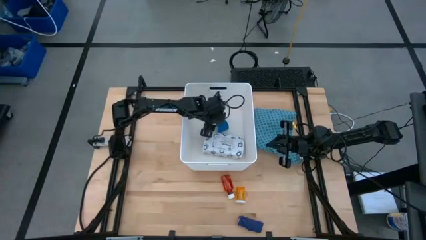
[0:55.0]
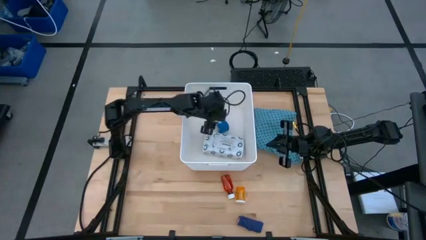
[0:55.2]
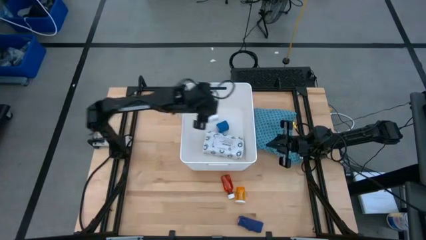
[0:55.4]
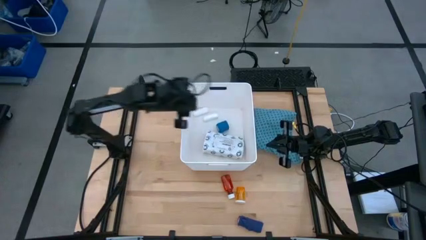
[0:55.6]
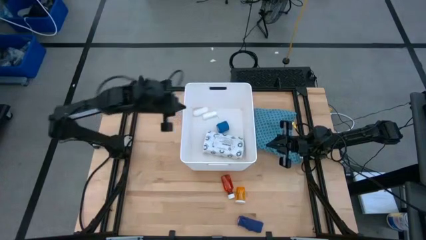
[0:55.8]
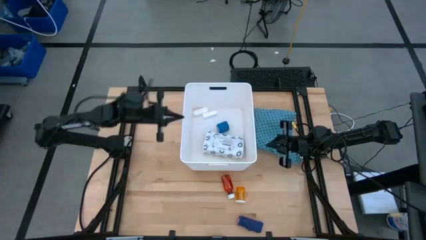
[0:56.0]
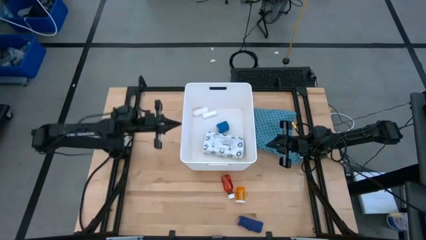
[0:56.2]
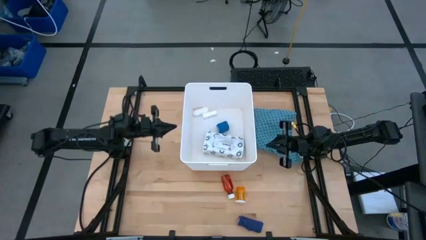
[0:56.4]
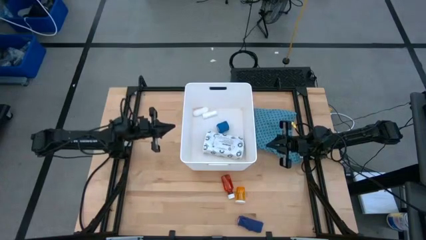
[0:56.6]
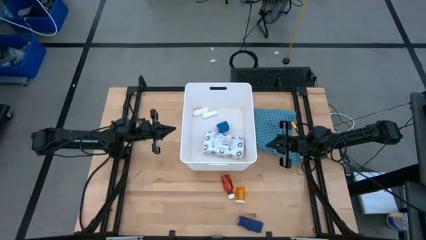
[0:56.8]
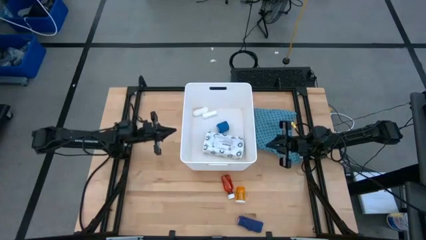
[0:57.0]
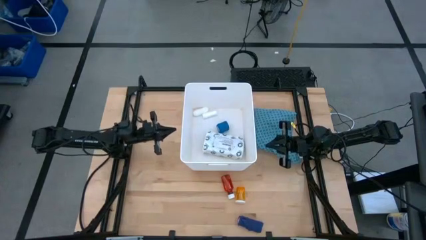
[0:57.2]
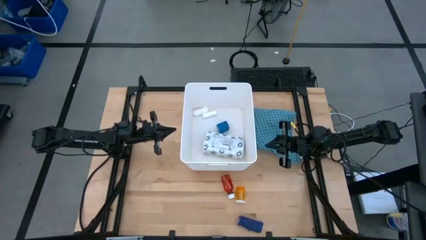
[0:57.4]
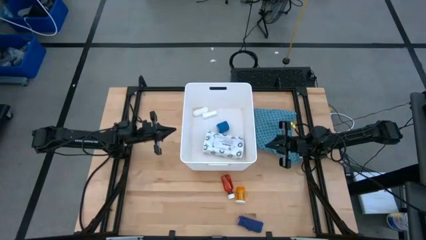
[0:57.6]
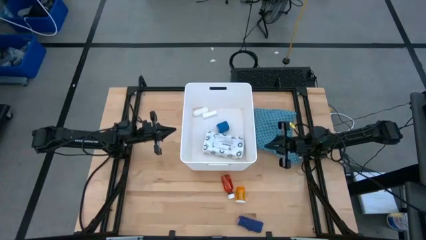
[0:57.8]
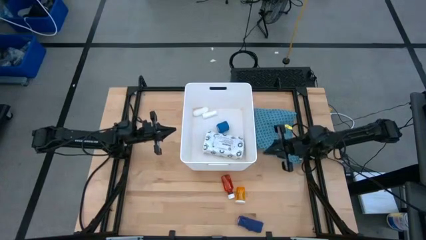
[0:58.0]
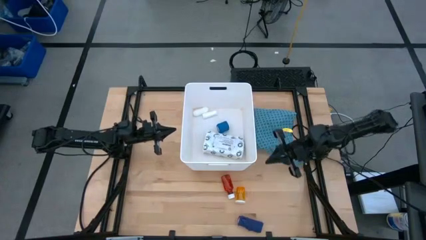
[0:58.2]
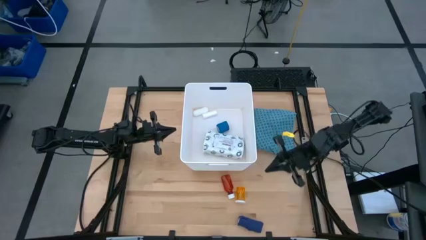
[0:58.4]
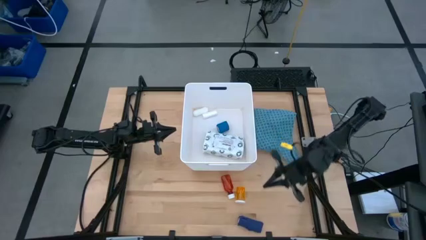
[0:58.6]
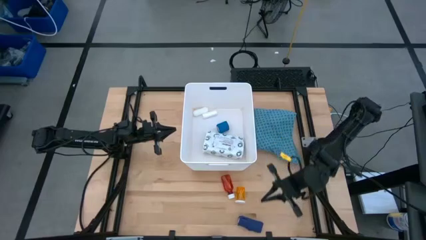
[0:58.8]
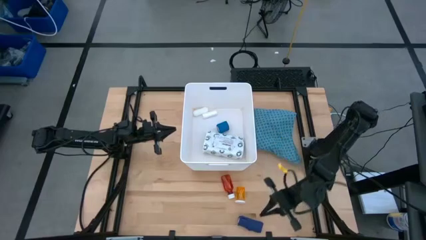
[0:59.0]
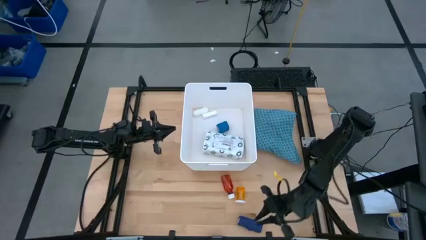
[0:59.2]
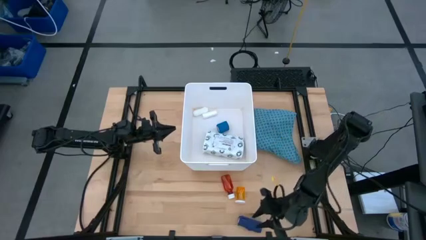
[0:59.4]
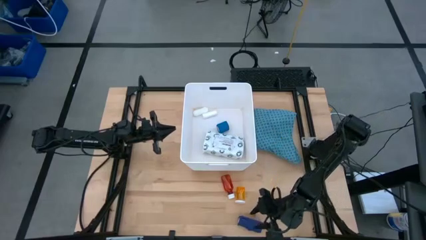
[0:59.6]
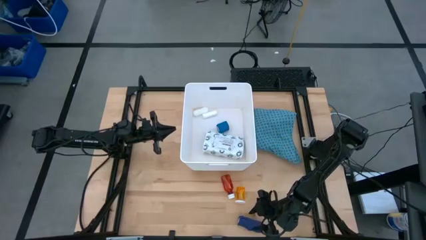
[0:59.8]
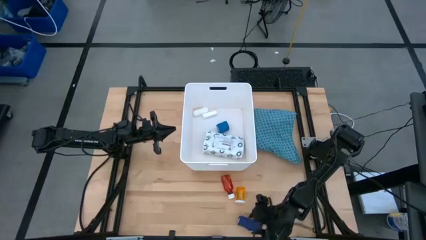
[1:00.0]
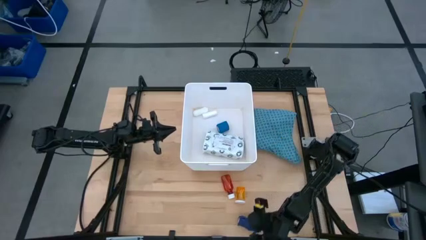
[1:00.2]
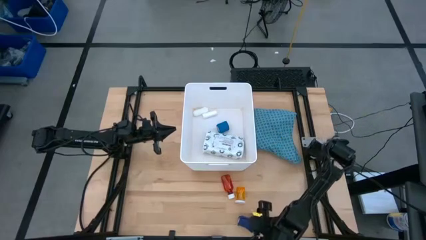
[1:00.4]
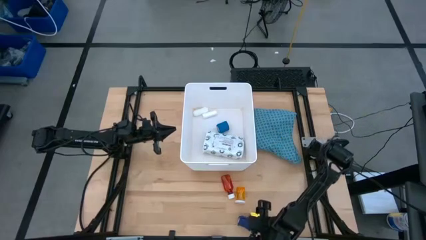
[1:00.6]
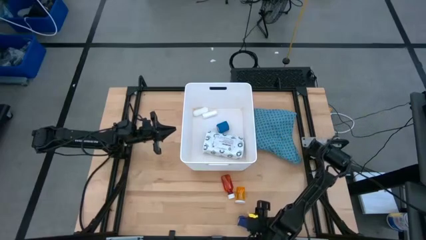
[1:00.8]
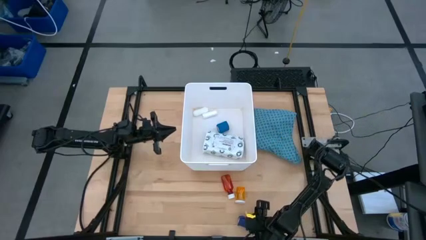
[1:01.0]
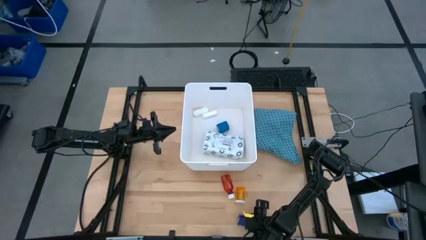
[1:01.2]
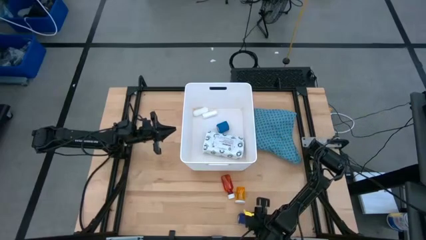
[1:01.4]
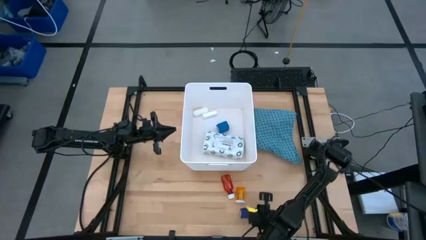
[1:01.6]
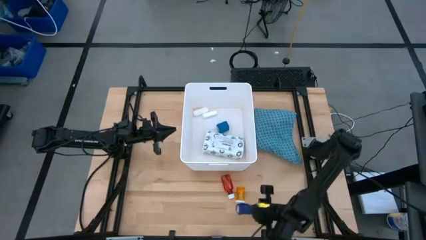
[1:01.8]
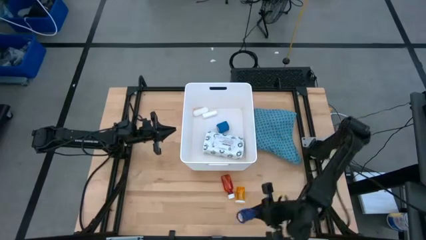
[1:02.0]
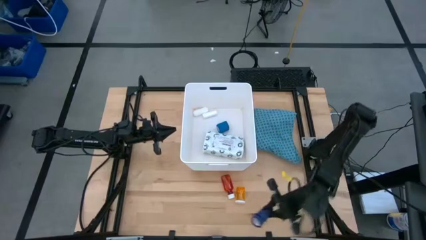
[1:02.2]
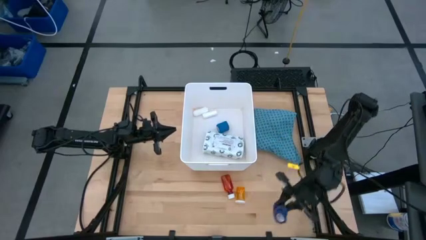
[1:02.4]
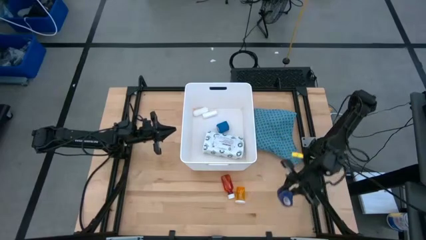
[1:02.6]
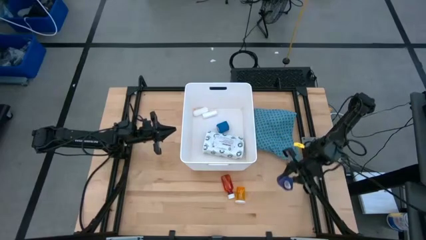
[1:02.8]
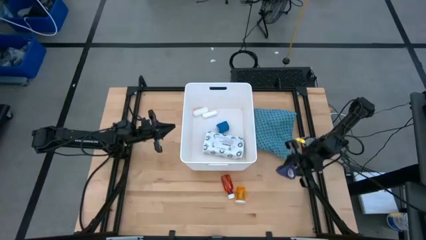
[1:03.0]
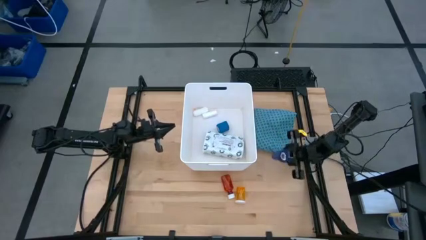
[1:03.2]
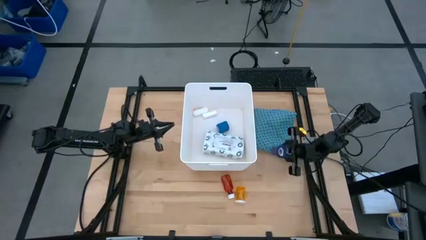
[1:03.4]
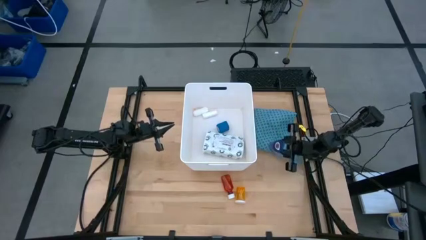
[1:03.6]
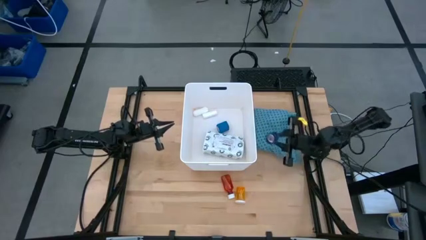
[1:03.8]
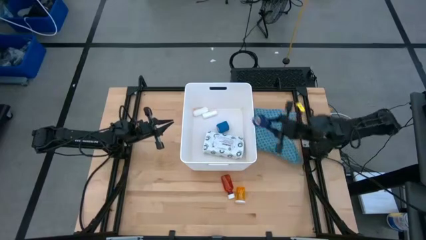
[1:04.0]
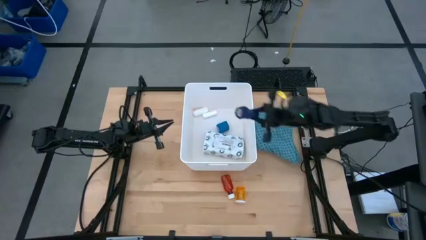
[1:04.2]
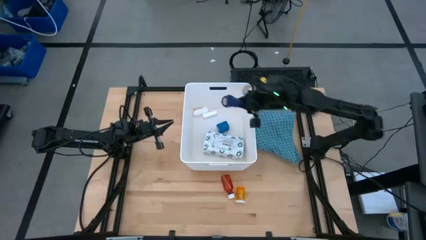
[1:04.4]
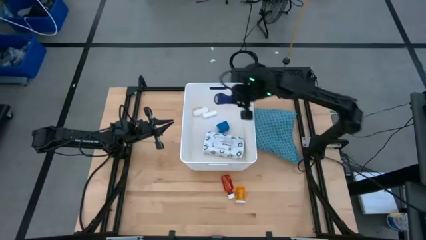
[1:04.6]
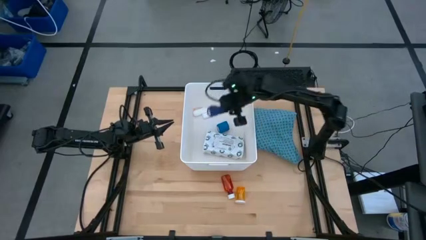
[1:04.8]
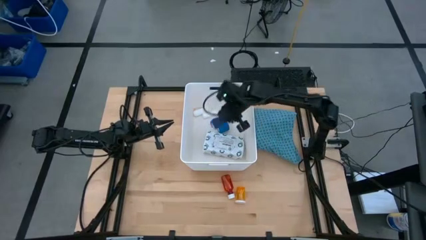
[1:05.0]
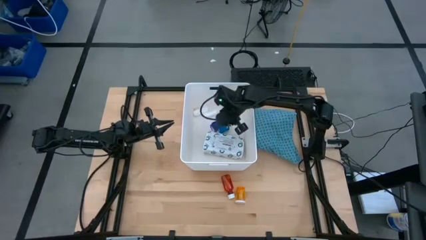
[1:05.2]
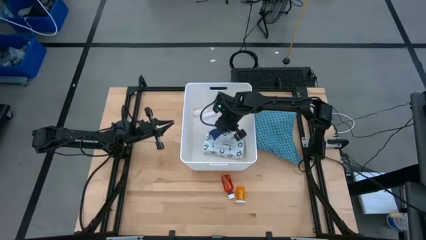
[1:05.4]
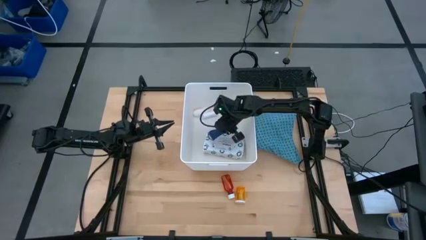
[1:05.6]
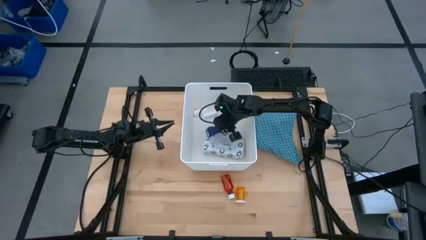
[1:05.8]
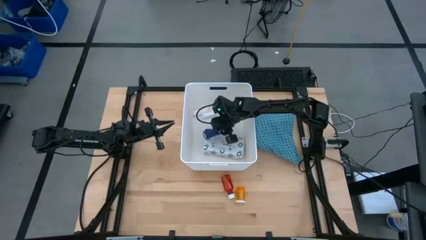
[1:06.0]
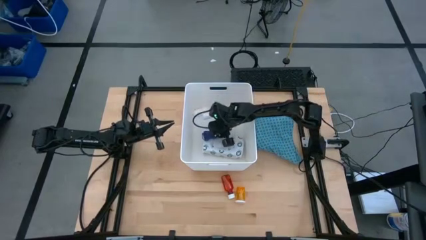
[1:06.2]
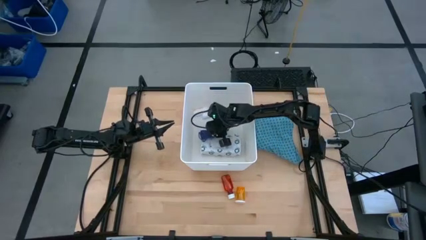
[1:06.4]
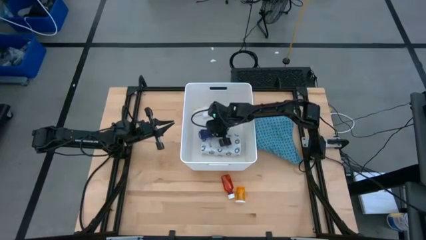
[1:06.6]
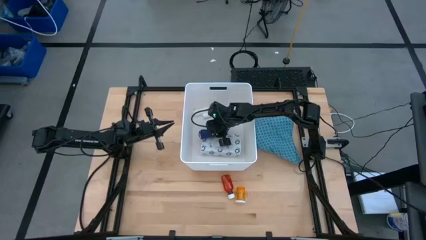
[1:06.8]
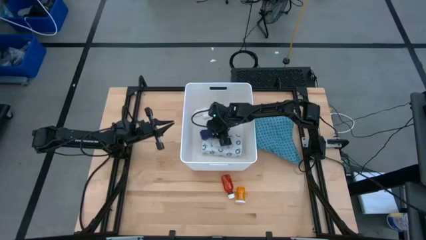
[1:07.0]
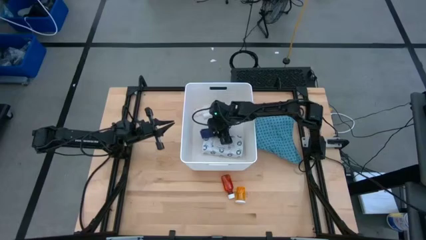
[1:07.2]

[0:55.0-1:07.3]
Task: Pick & place medical supplies in basket/bin
Put the dark blue bandage into the white bin

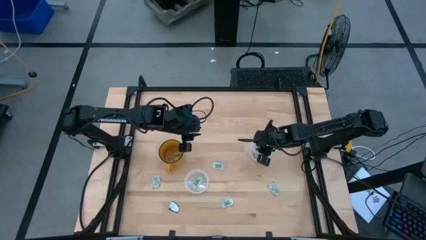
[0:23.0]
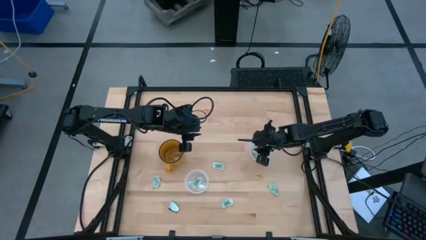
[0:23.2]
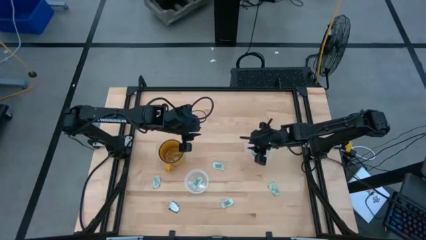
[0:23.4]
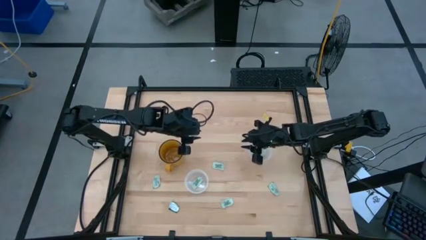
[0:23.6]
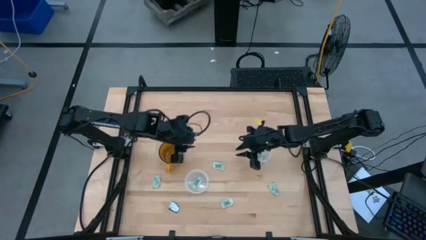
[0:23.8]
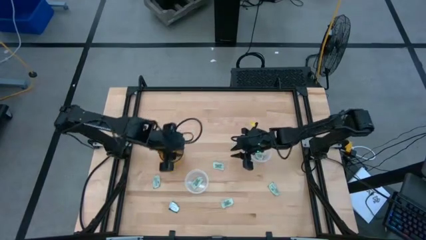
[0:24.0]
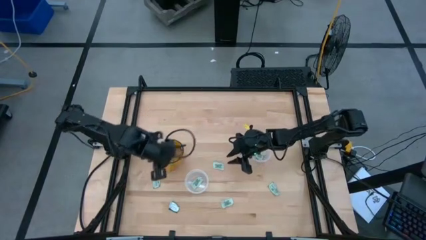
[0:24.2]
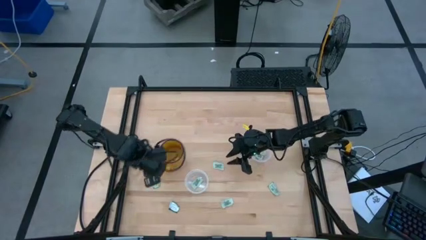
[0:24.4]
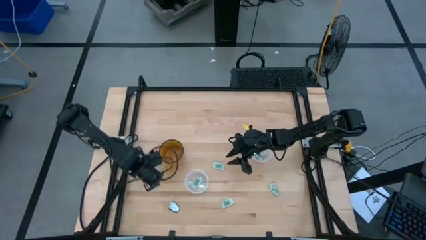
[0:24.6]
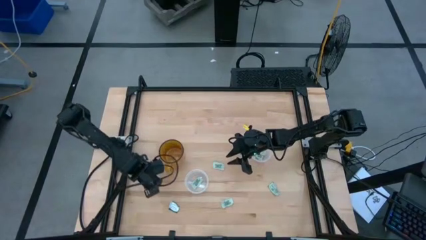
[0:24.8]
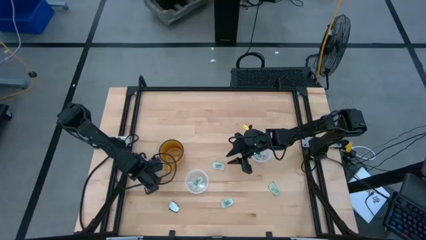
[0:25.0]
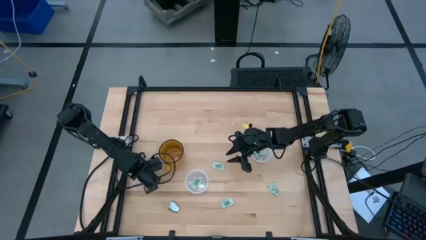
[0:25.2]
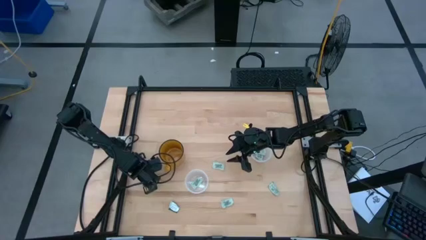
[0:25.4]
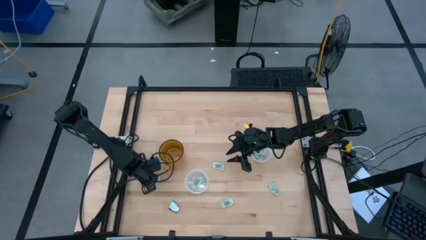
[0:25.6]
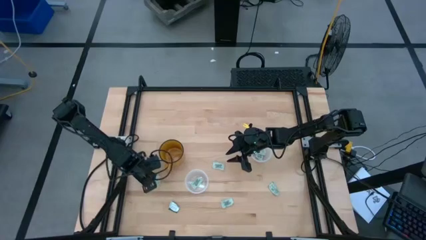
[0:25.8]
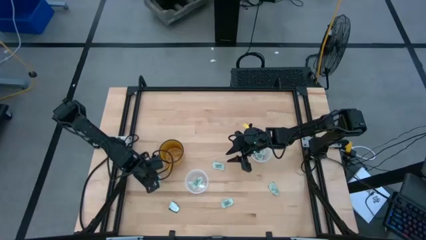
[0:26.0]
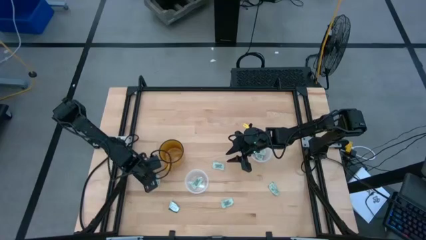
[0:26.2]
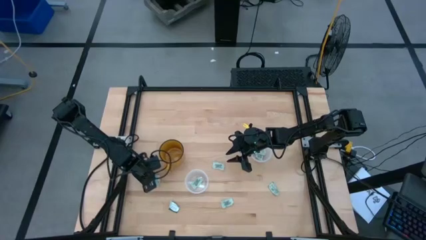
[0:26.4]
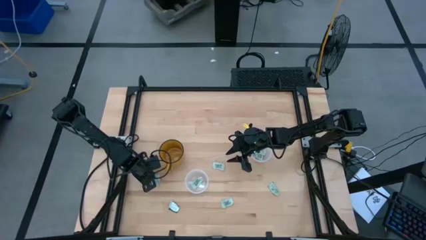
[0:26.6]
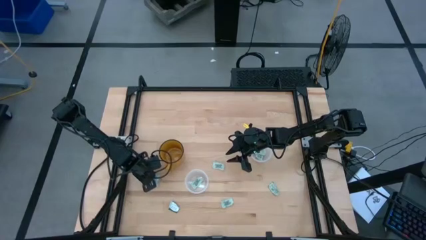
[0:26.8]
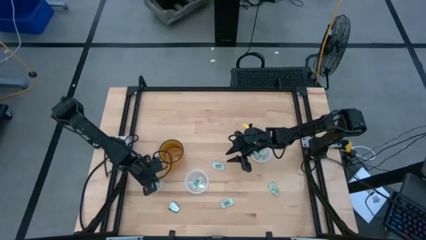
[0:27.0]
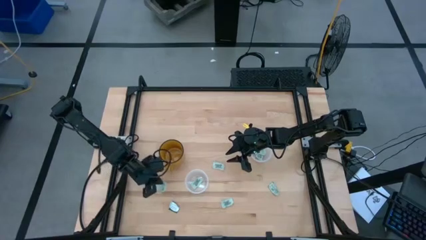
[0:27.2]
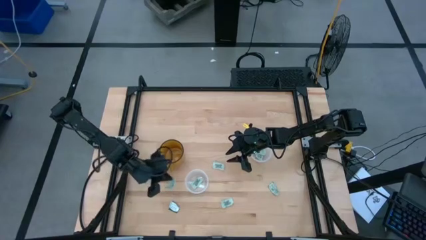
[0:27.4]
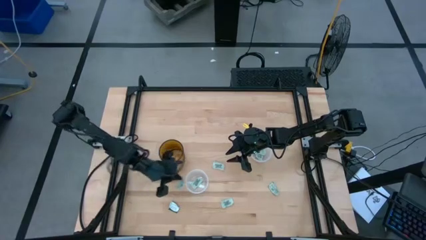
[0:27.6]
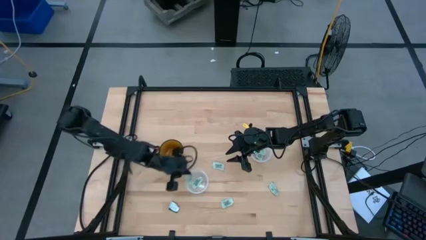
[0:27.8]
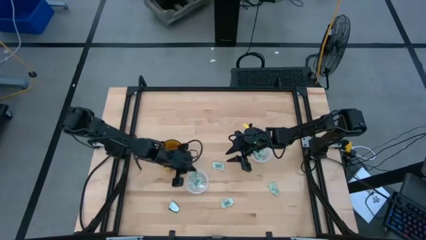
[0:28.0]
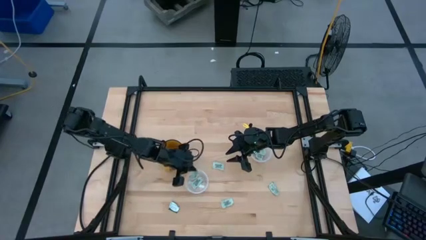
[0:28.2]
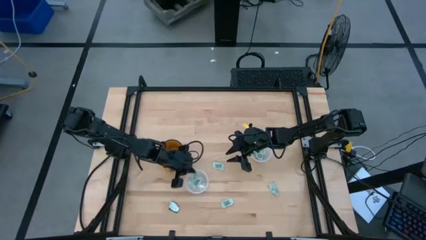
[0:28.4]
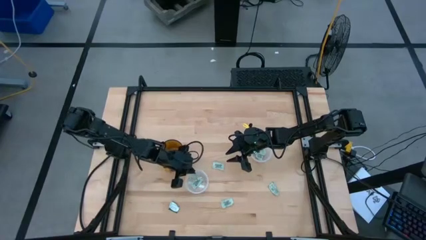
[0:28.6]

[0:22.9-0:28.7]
Task: Pick and place Stevia / Truvia into bins
Put the white stevia packet into the left transparent container
